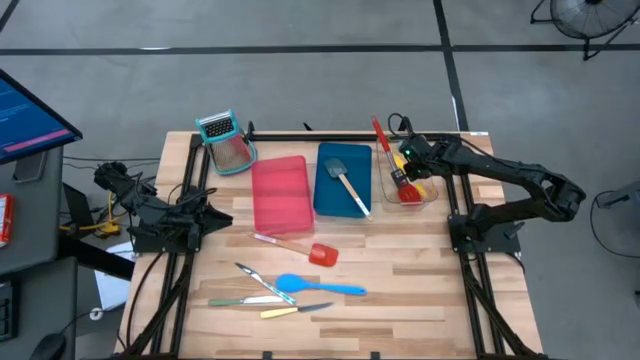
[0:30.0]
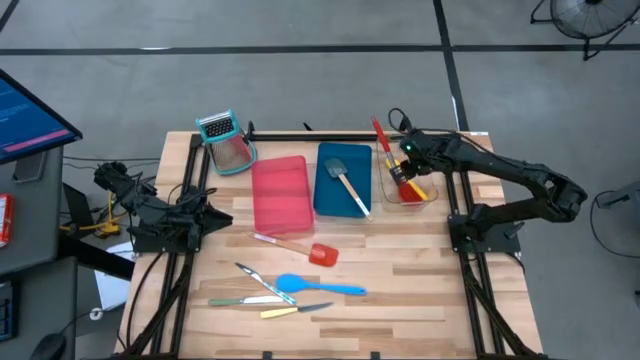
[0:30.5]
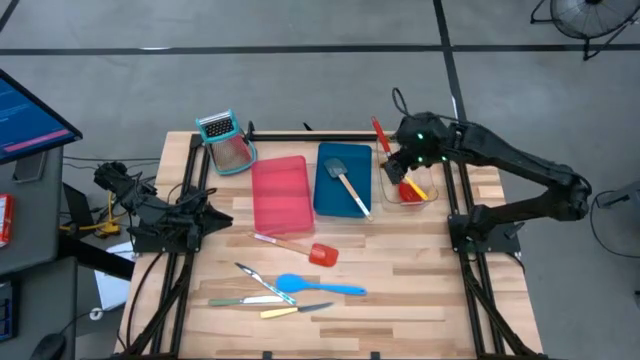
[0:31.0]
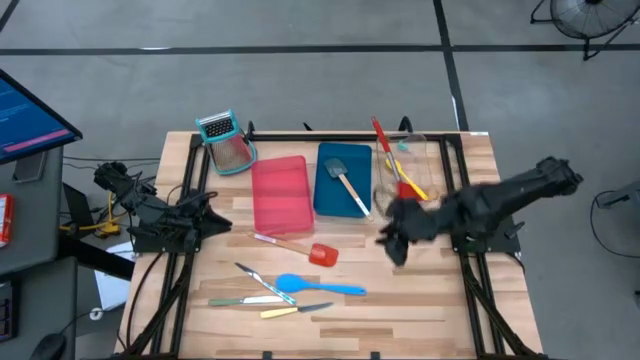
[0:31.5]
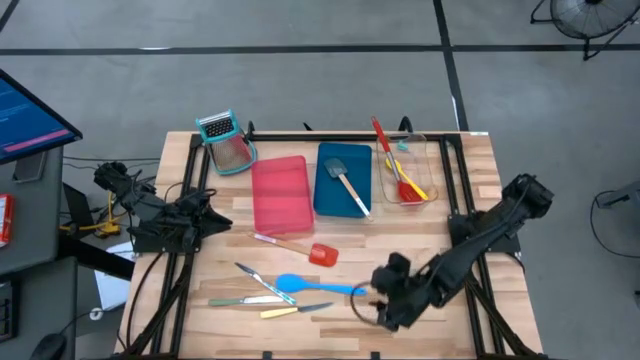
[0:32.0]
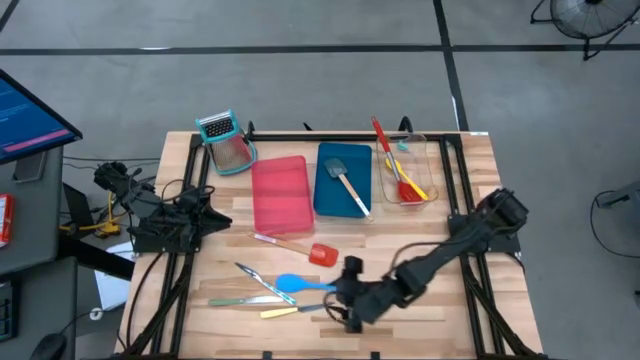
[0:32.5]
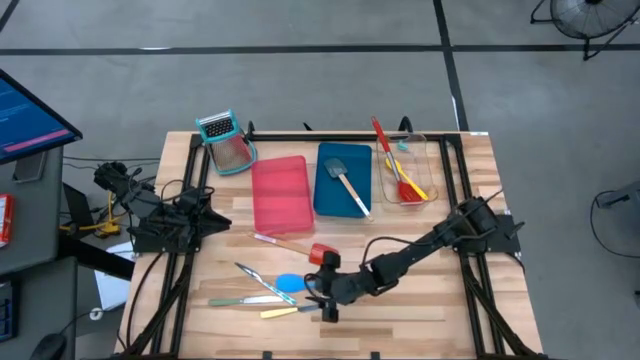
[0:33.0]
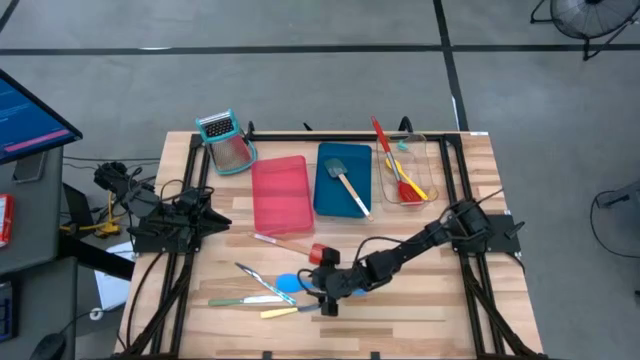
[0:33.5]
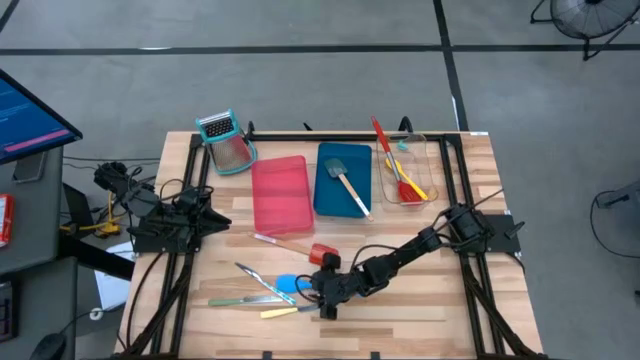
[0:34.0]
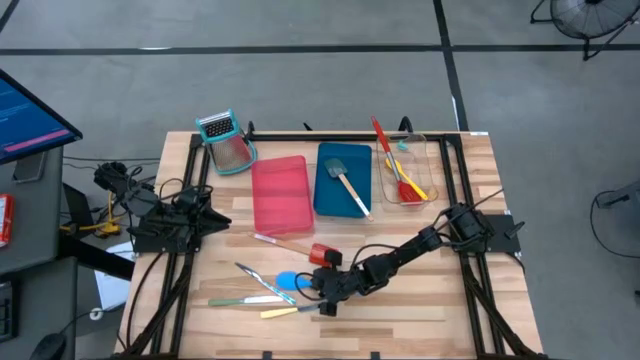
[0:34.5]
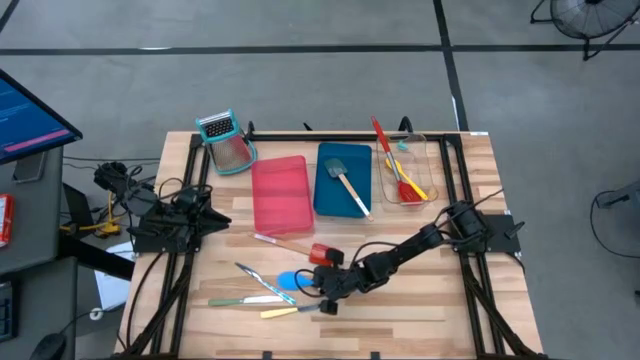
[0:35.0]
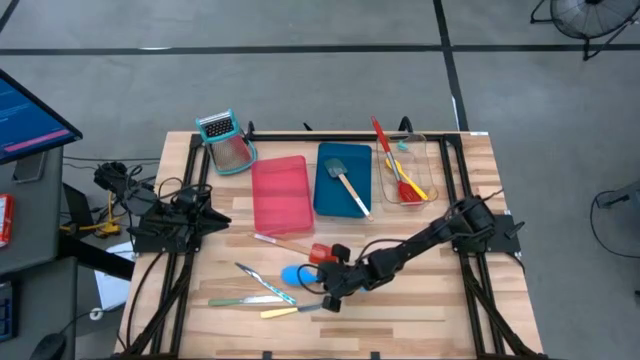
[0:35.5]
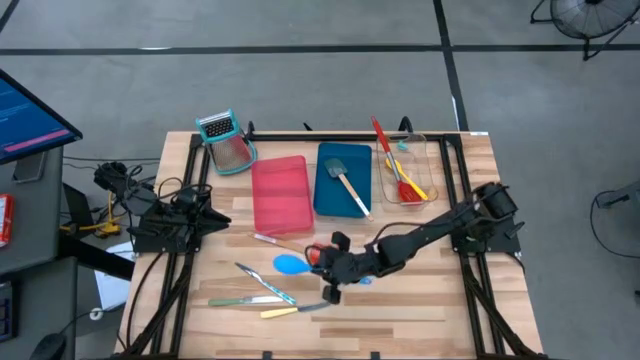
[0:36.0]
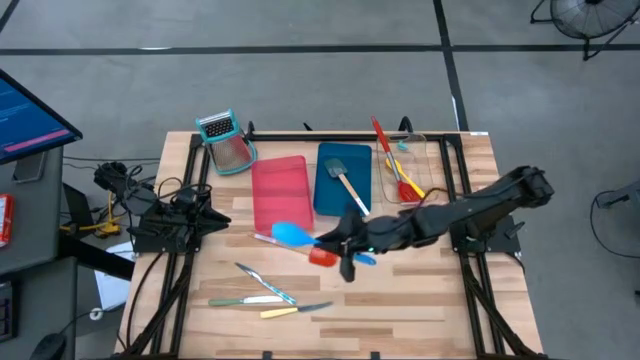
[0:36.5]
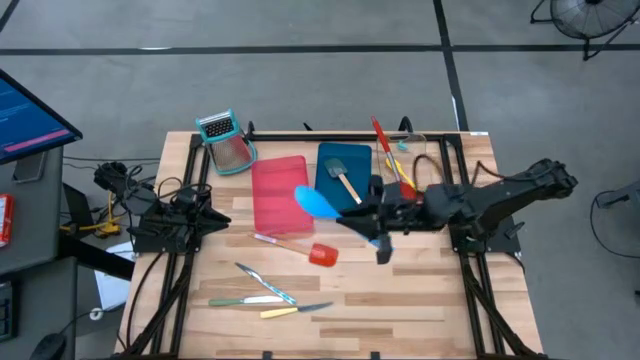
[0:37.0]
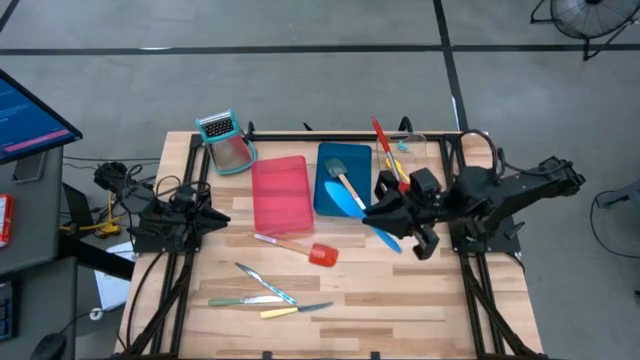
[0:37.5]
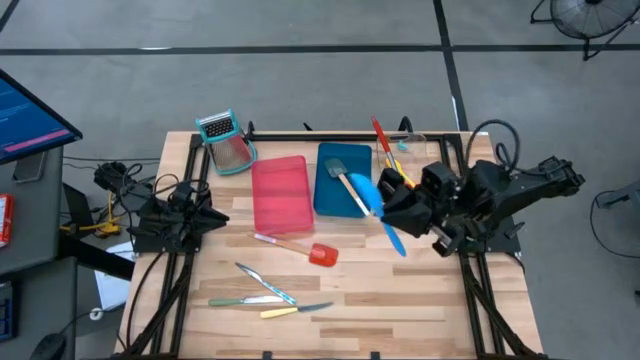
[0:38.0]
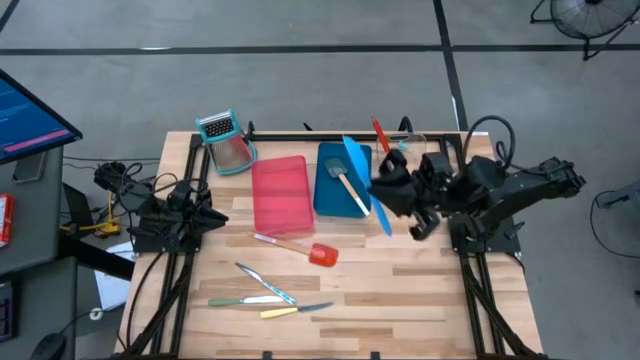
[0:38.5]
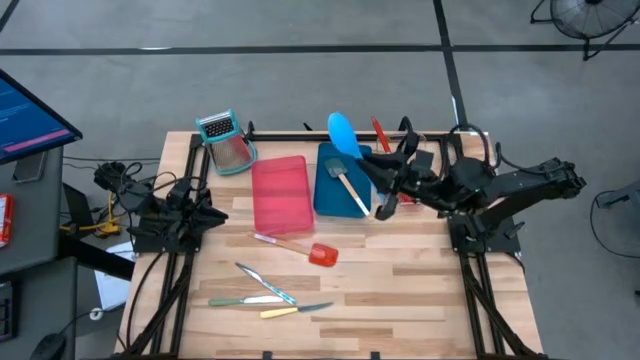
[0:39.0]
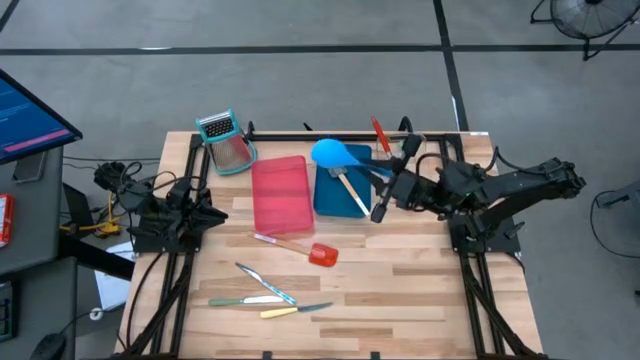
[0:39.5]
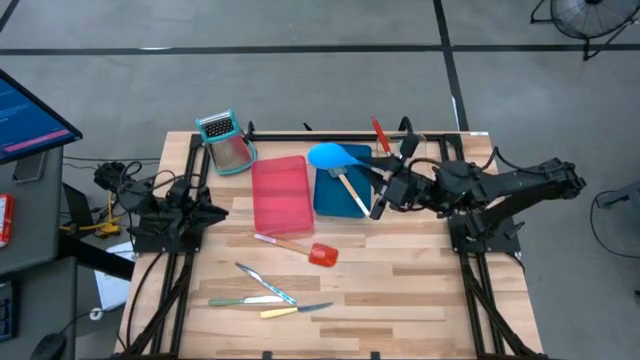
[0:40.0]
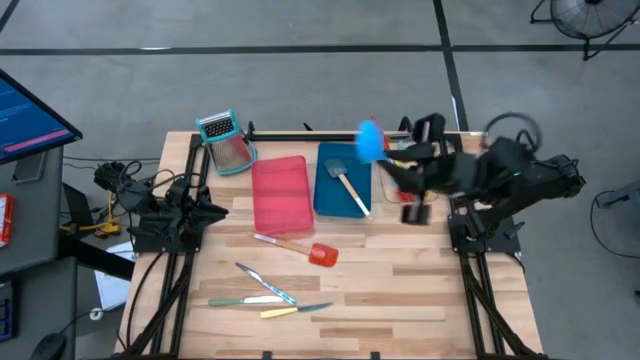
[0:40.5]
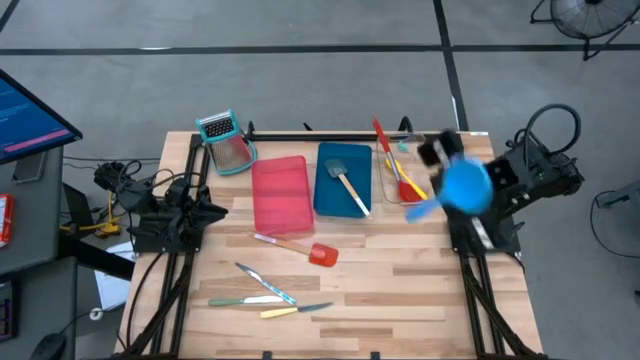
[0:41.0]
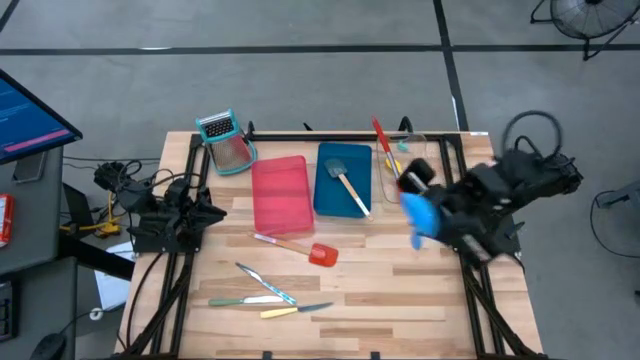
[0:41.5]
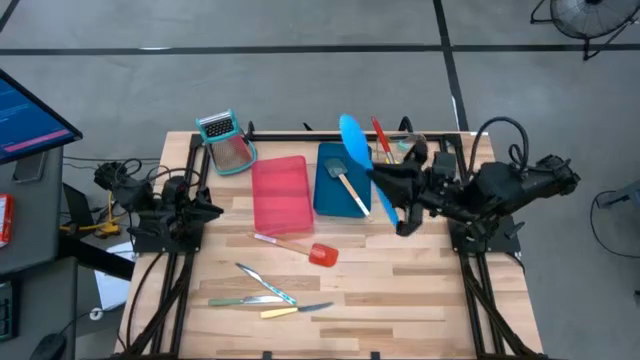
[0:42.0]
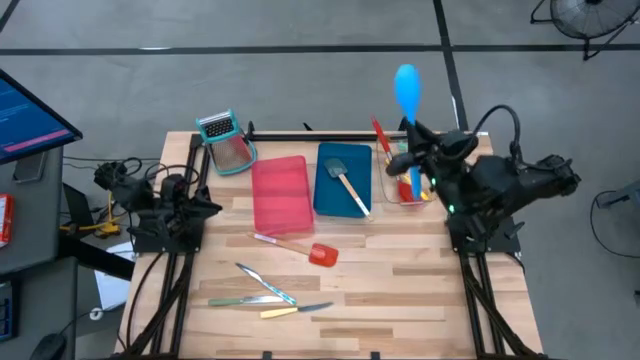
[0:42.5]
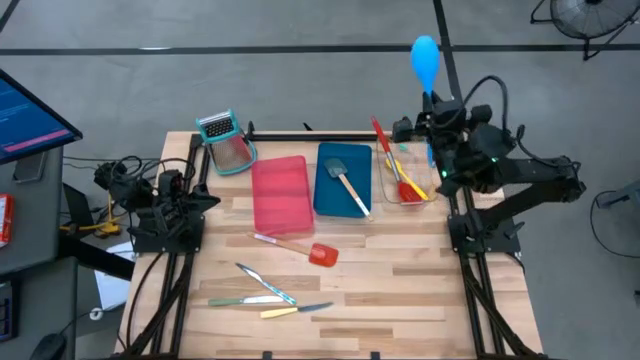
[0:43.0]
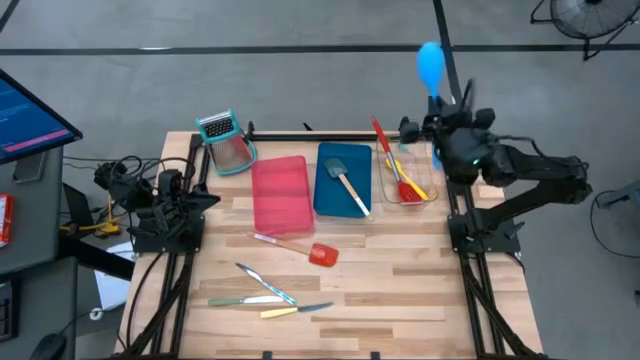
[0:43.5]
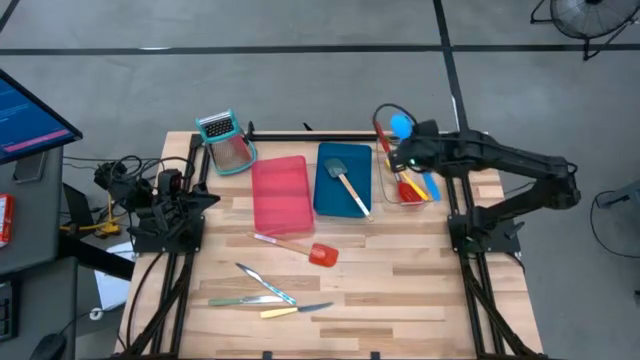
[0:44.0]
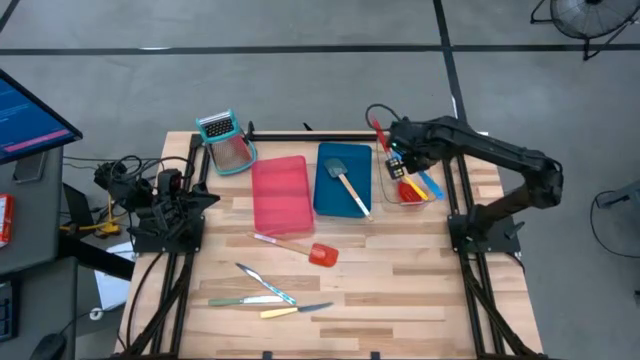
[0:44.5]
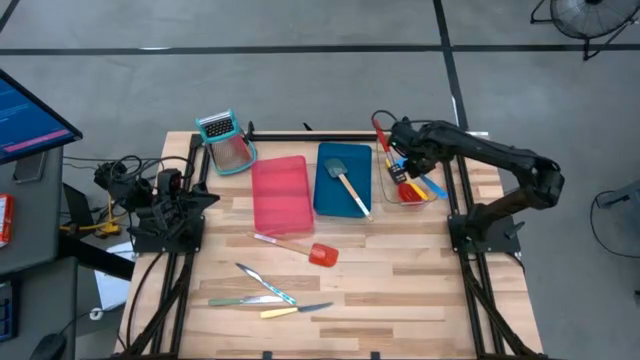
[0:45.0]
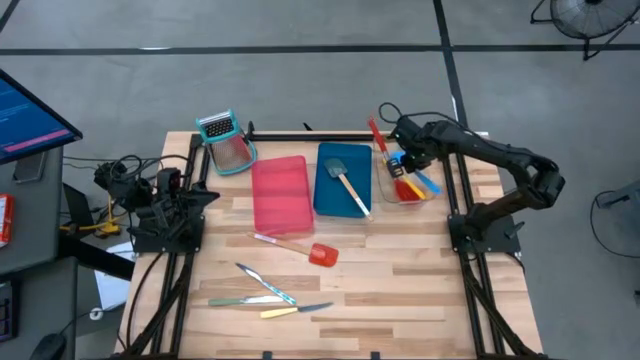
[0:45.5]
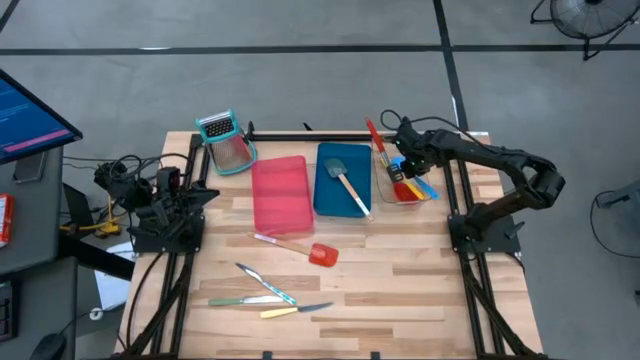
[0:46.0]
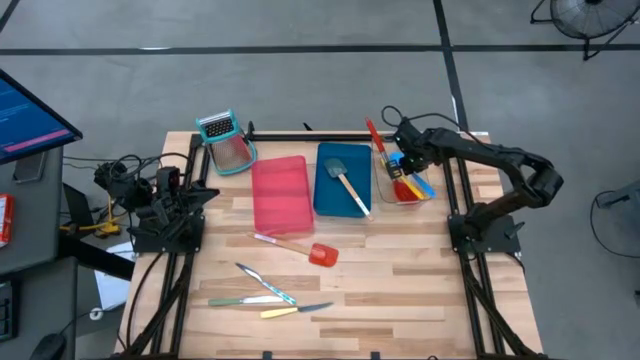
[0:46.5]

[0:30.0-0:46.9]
Task: Pick & Place Kitchen Items
Put the blue serving spoon into the transparent bin

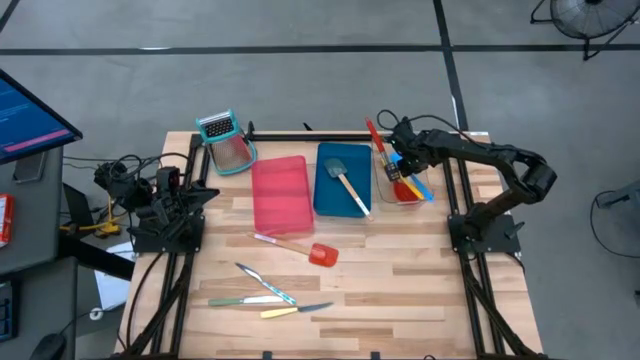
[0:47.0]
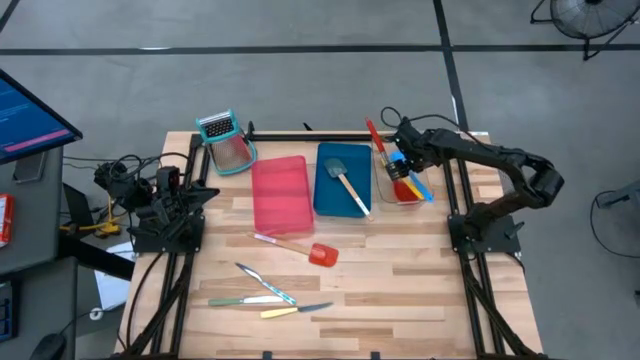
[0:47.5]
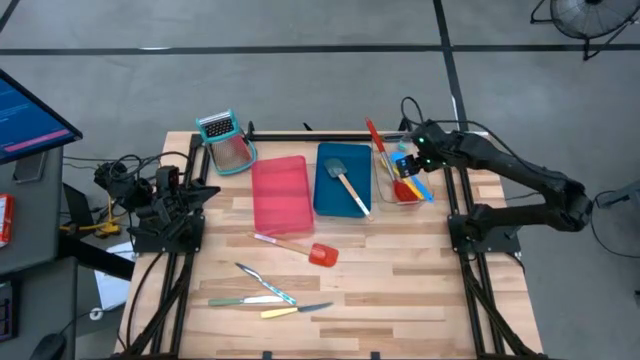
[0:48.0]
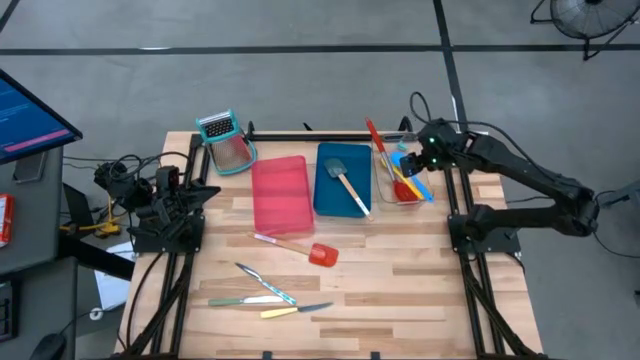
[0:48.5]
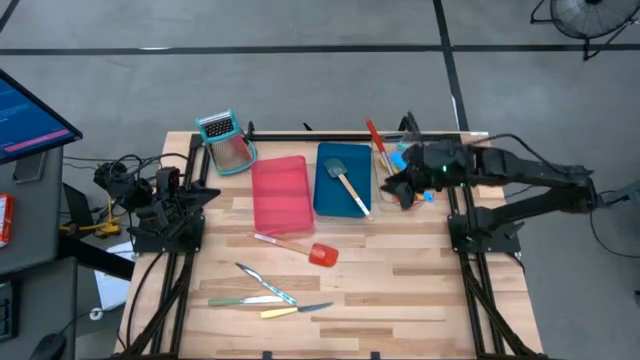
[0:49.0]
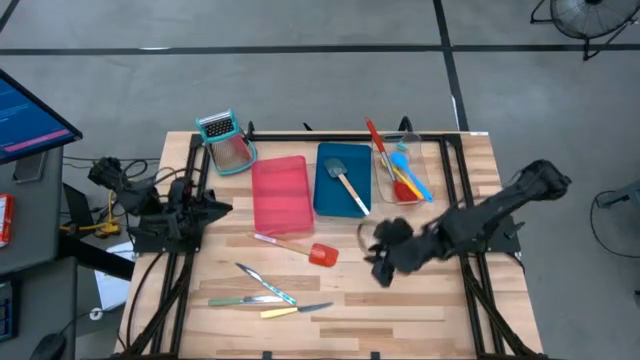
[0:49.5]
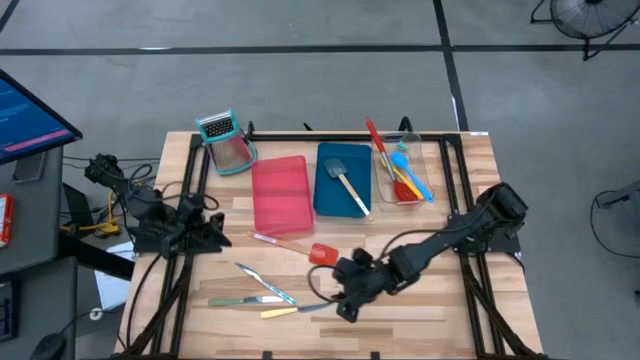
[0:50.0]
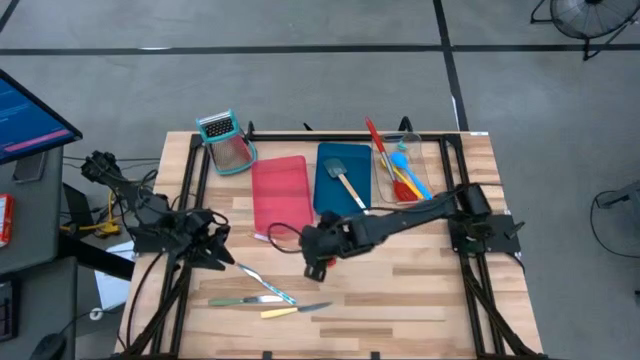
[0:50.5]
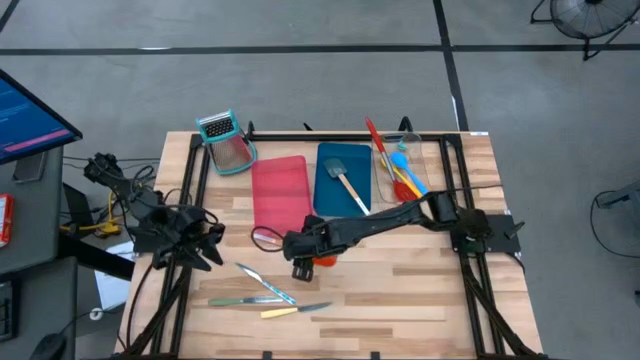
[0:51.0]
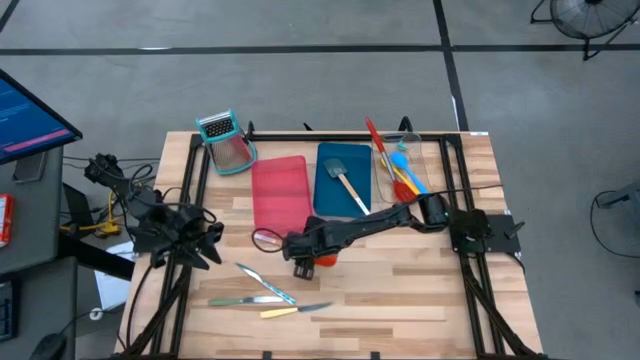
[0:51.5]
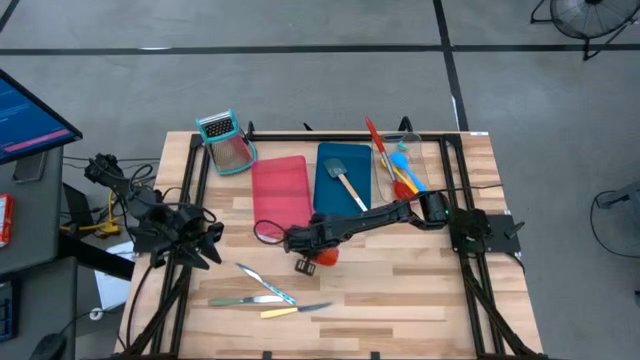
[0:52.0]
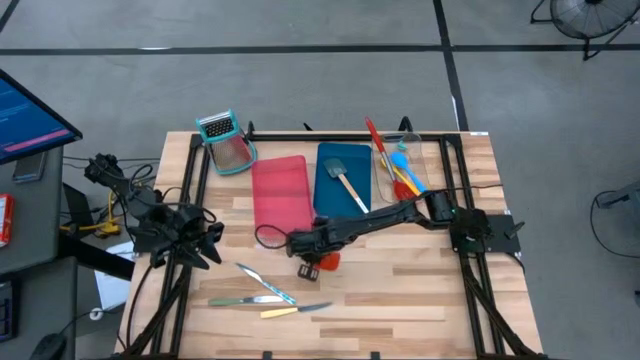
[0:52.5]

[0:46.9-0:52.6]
Put the red spatula into the blue bin
